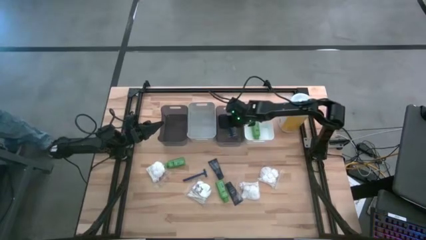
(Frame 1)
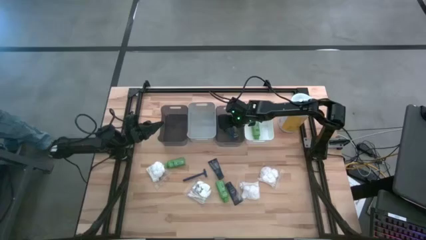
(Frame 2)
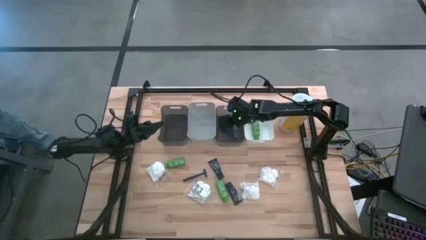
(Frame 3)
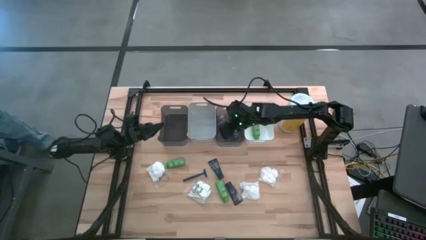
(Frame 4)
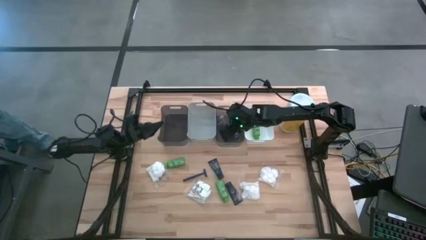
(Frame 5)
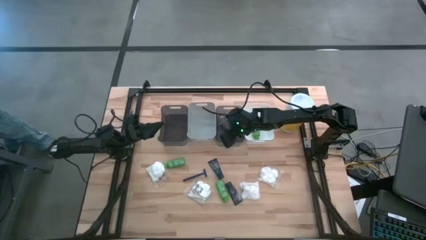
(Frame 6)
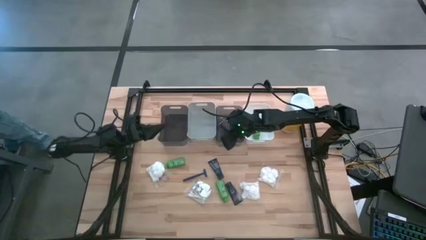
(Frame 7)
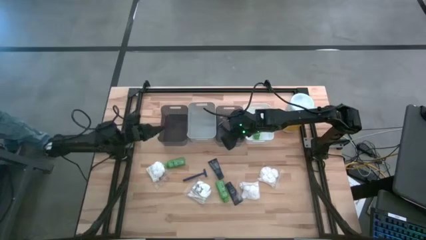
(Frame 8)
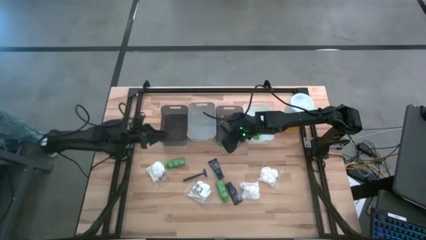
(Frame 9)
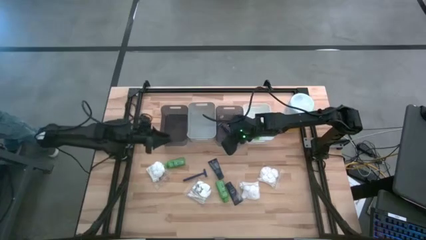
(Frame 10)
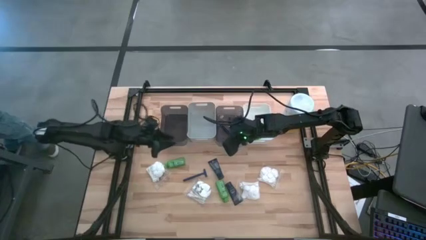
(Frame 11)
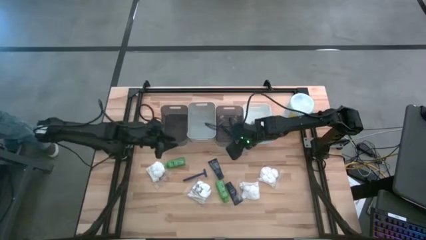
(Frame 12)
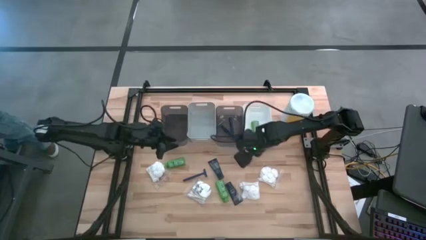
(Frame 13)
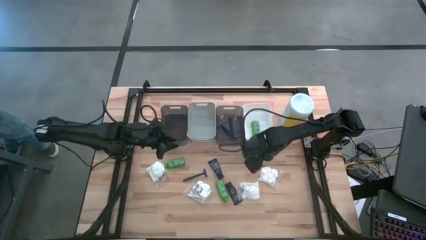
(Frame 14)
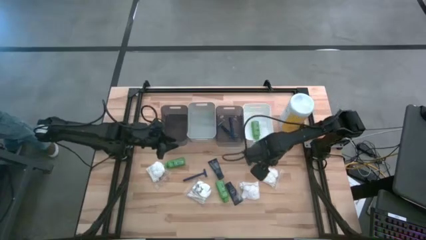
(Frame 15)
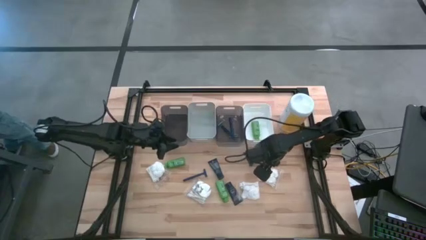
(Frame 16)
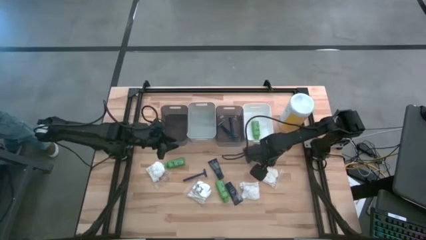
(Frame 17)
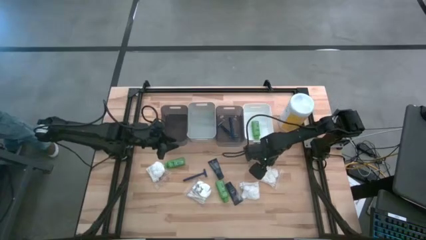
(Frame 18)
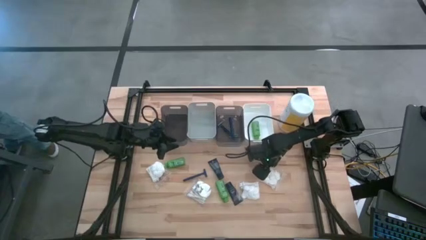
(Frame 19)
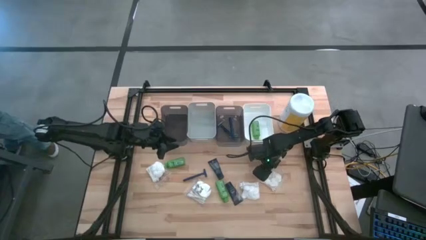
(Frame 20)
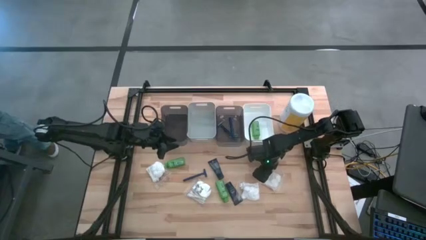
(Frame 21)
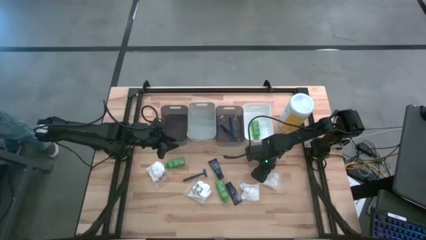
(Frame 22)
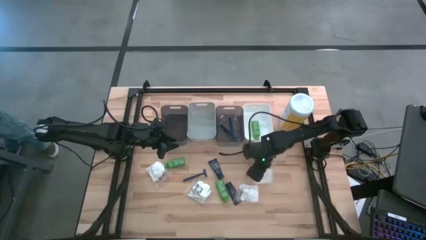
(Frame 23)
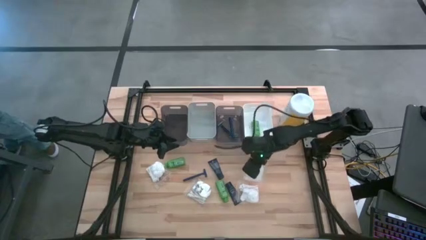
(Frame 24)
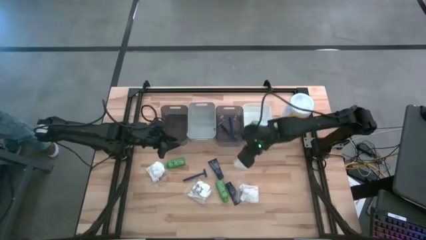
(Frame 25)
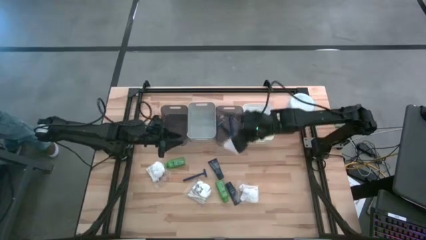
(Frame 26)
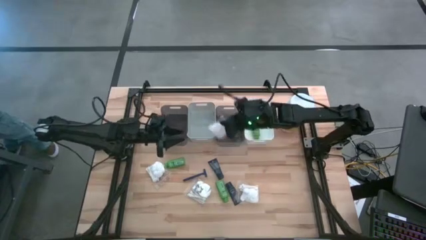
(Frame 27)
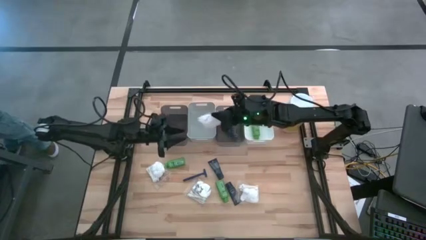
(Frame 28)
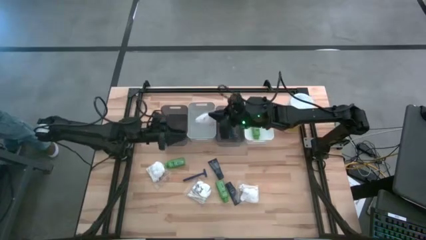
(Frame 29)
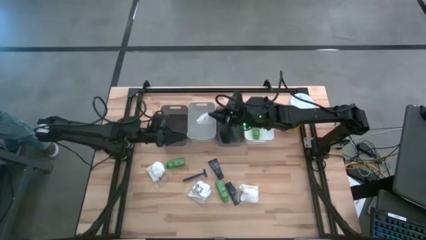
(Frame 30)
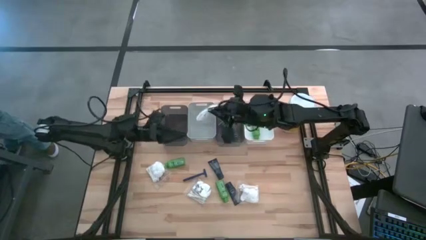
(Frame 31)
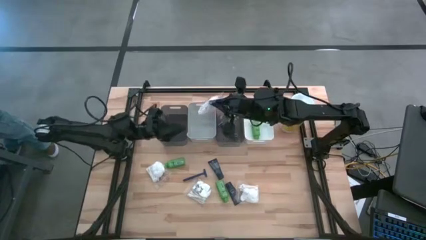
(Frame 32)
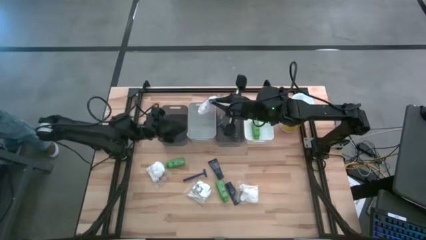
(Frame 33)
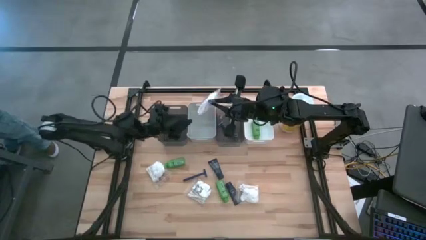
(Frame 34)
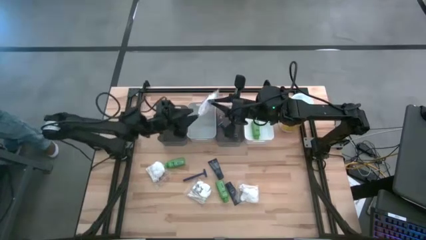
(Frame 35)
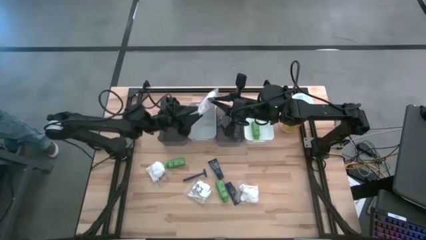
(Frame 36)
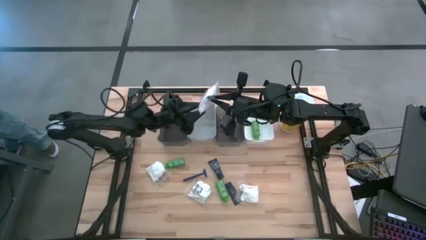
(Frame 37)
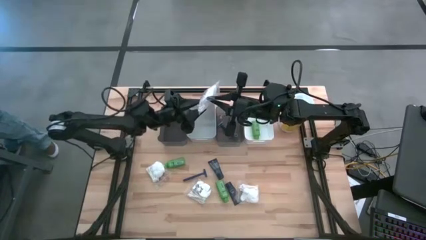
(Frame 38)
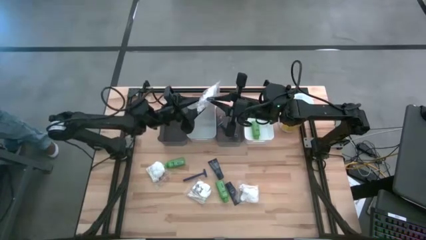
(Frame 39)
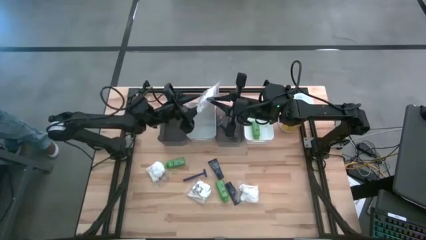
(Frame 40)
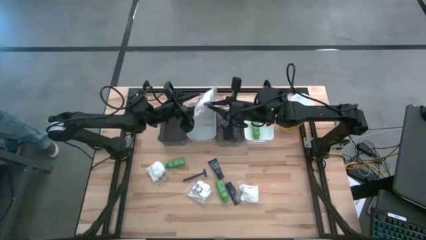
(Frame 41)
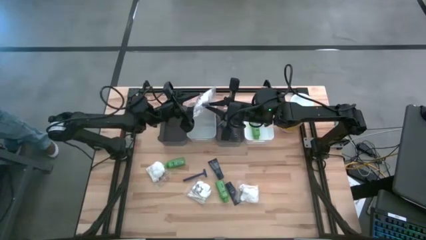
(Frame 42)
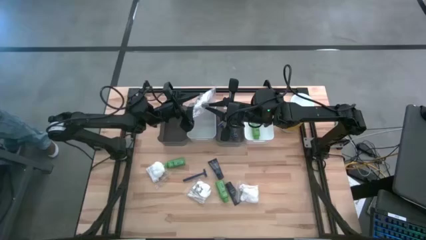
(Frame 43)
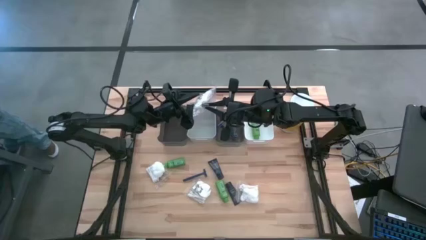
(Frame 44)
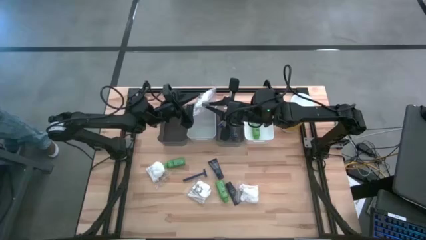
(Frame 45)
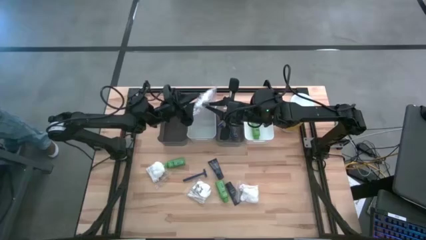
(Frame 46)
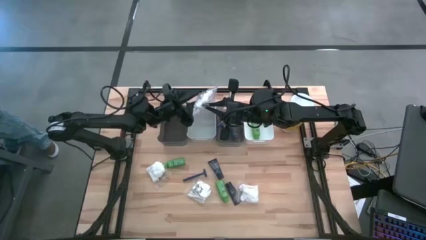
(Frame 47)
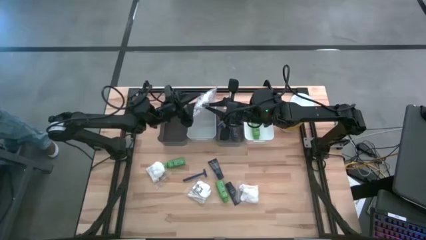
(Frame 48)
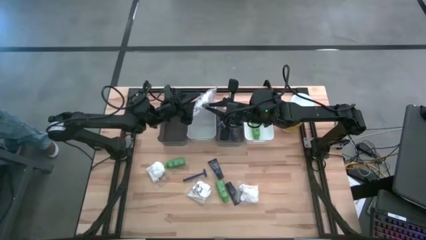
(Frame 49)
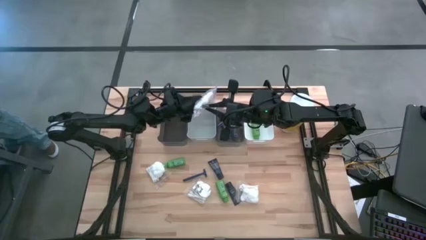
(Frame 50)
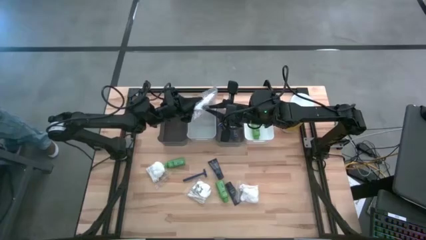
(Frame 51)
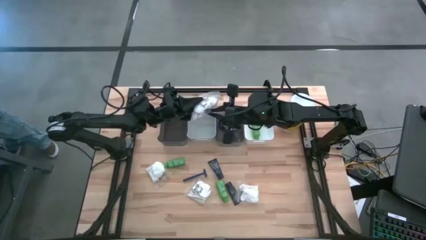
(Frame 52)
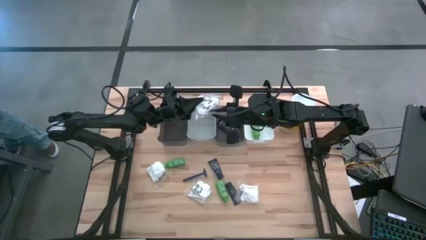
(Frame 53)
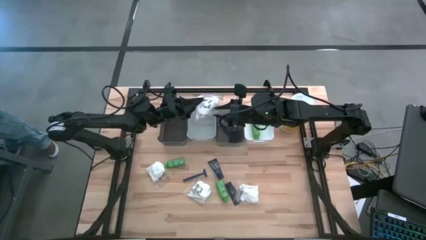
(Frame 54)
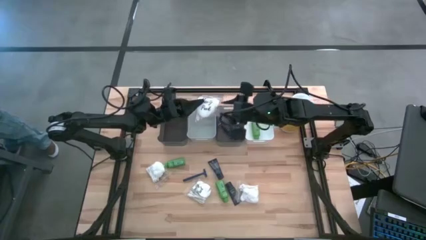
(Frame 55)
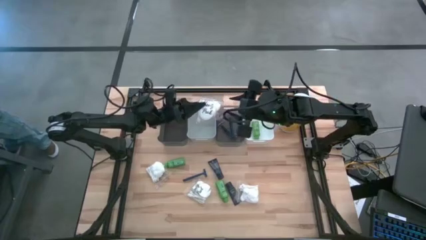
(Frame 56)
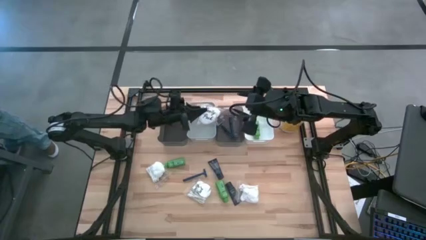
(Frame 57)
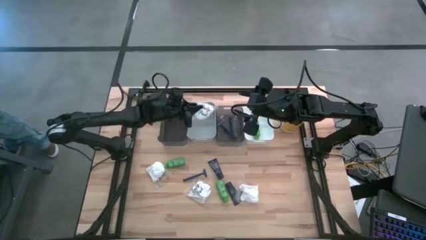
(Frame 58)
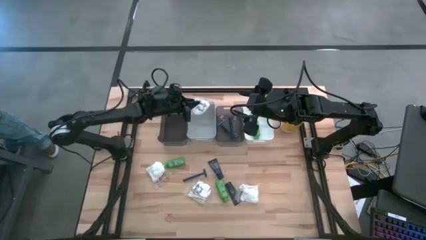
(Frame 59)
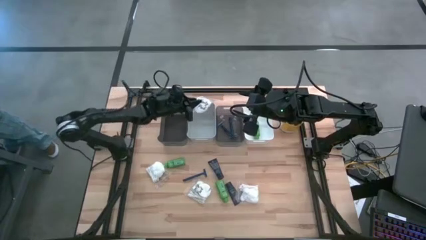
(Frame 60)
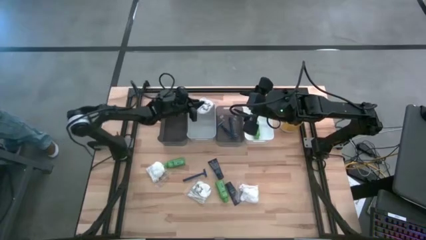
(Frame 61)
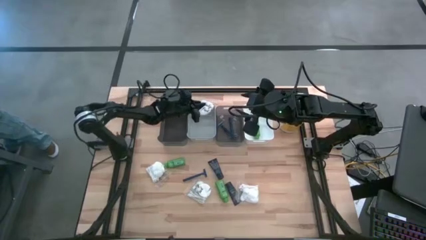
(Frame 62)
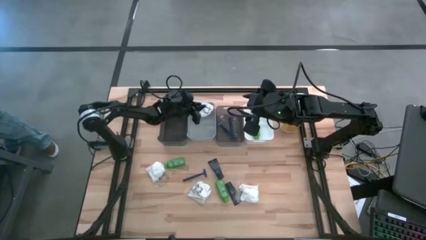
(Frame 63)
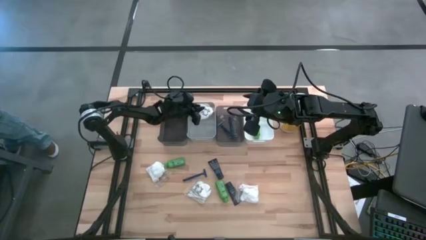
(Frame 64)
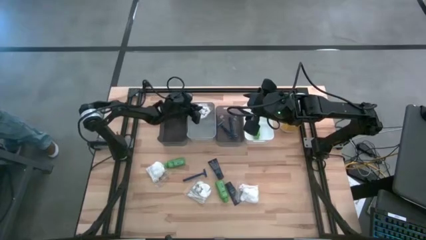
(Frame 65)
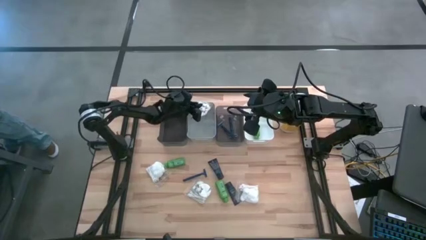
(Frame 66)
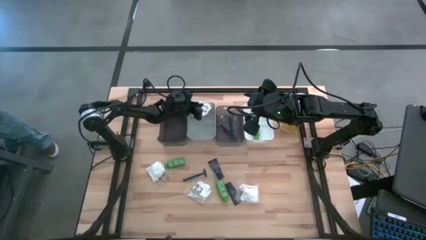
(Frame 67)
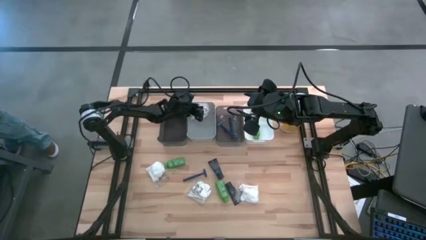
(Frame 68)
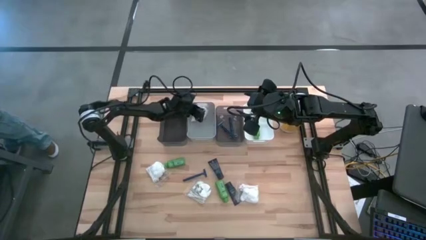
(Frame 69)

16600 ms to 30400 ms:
Task: Pick & Place Travel size toiletries
Put the white cotton pack into the gray bin
